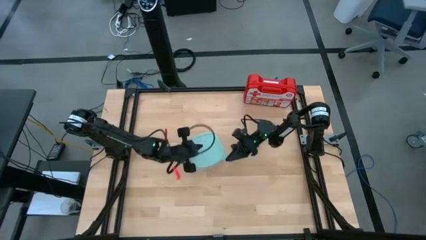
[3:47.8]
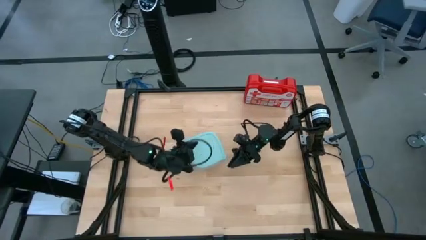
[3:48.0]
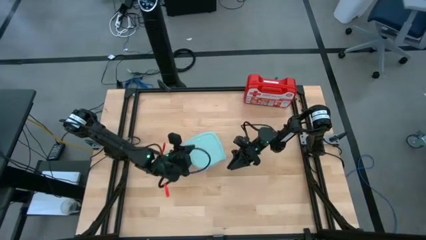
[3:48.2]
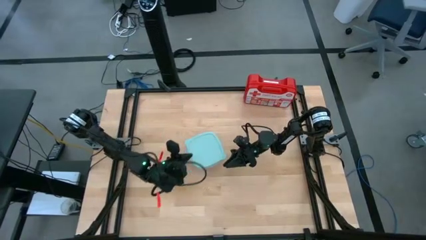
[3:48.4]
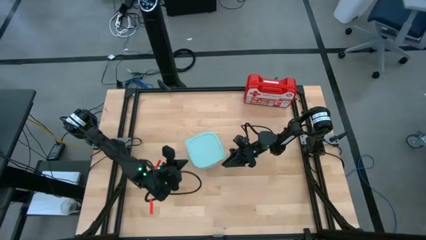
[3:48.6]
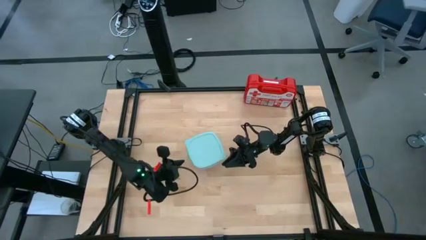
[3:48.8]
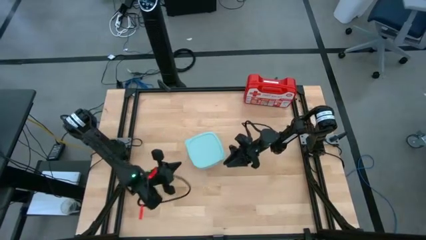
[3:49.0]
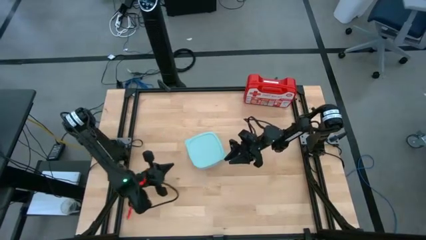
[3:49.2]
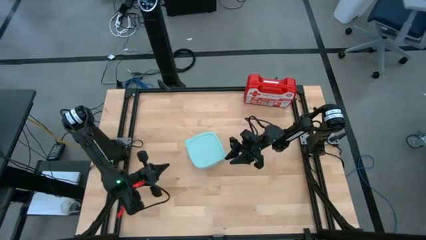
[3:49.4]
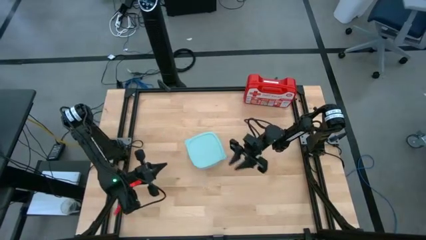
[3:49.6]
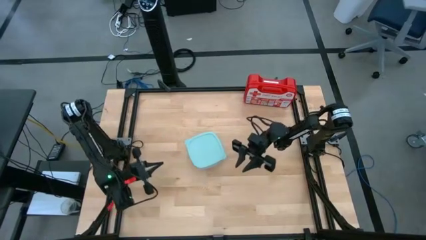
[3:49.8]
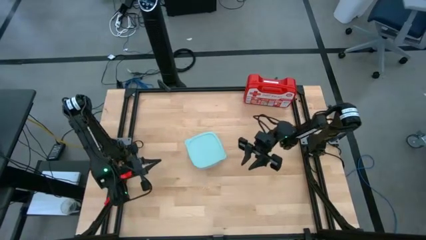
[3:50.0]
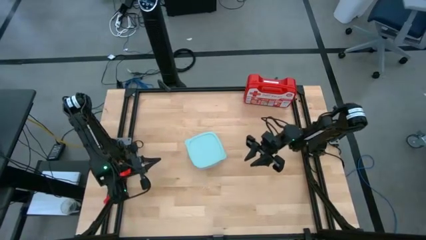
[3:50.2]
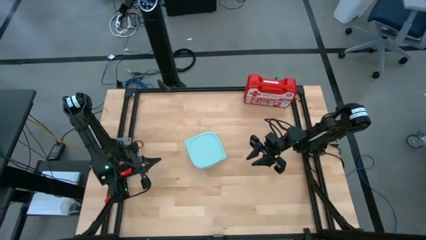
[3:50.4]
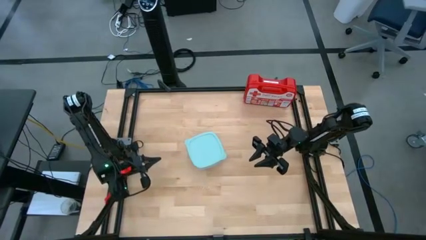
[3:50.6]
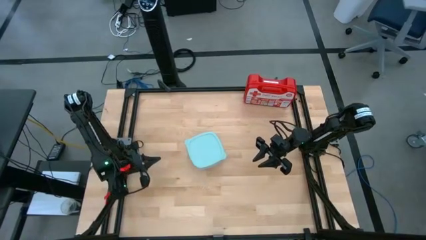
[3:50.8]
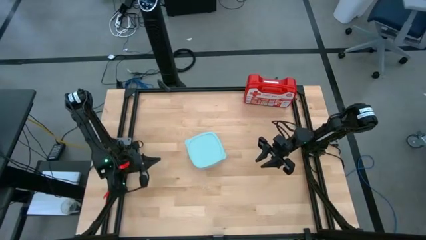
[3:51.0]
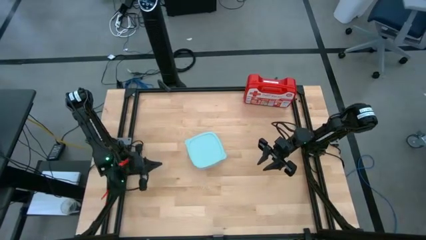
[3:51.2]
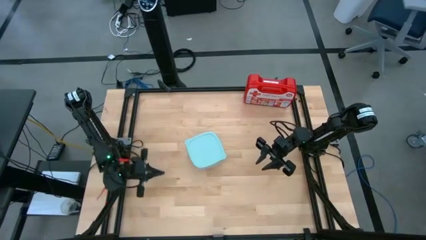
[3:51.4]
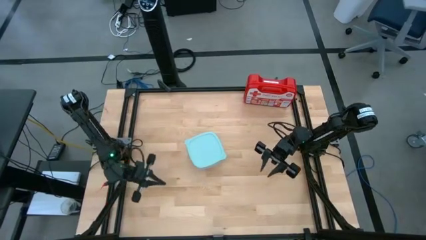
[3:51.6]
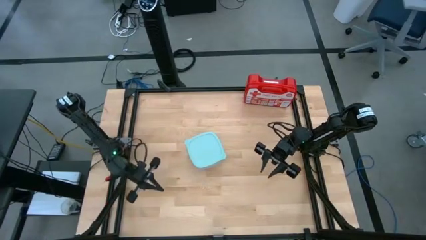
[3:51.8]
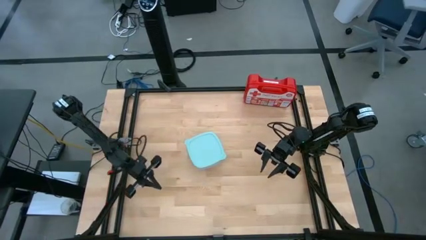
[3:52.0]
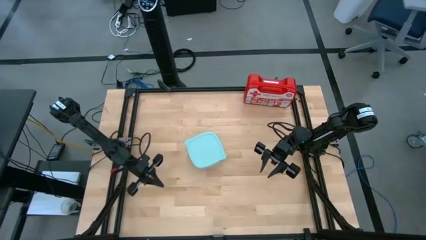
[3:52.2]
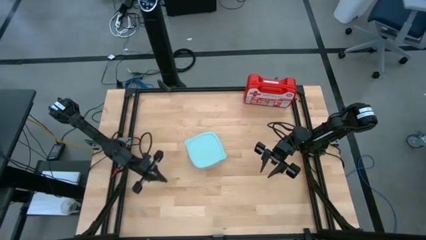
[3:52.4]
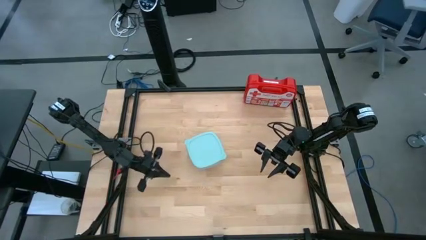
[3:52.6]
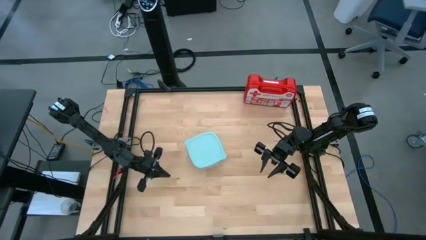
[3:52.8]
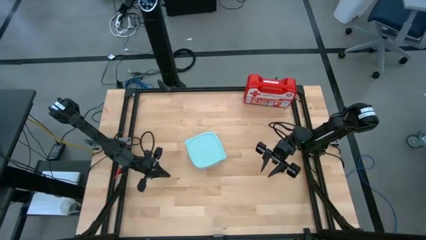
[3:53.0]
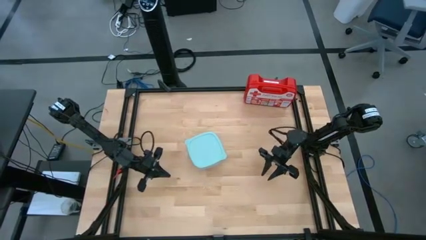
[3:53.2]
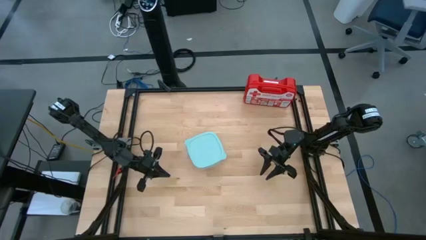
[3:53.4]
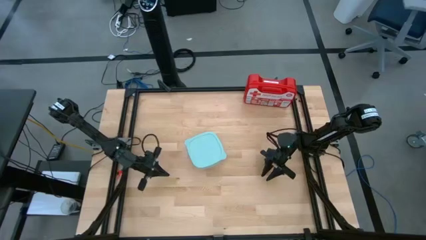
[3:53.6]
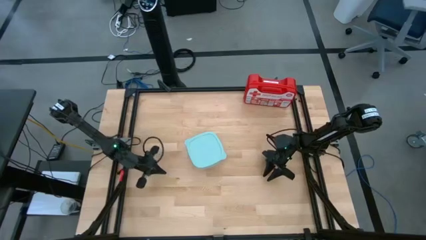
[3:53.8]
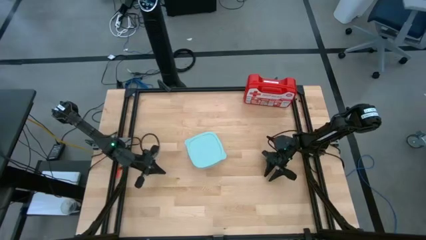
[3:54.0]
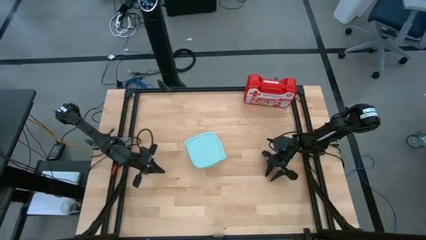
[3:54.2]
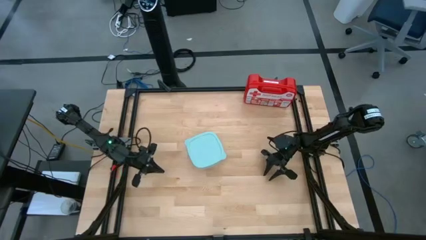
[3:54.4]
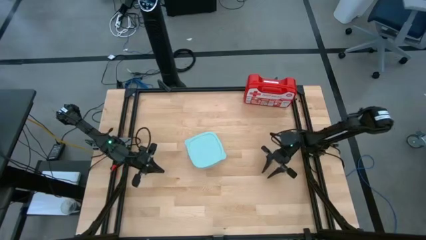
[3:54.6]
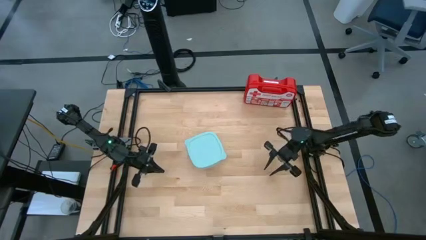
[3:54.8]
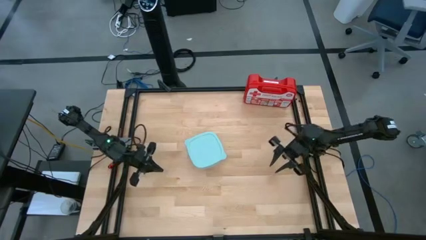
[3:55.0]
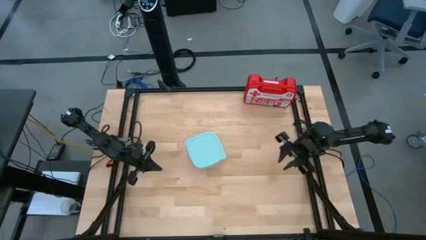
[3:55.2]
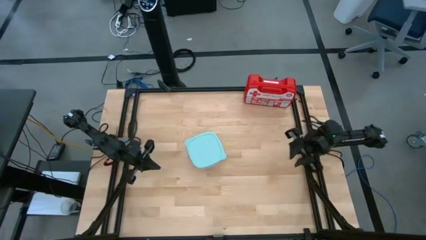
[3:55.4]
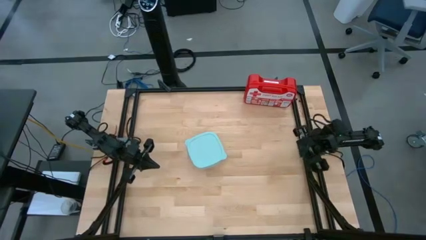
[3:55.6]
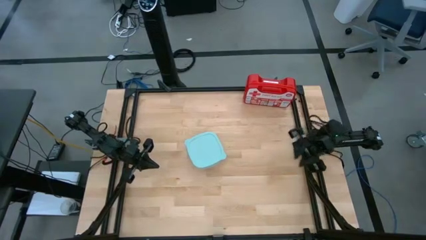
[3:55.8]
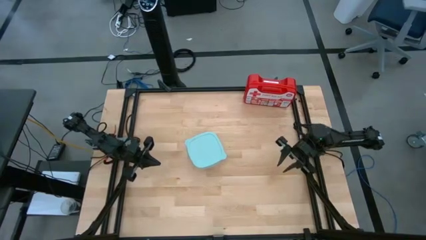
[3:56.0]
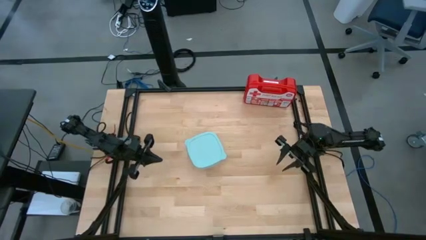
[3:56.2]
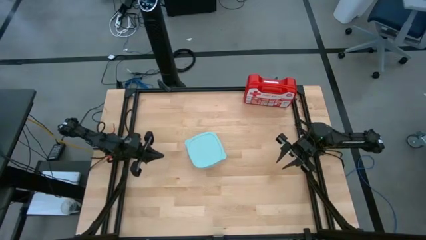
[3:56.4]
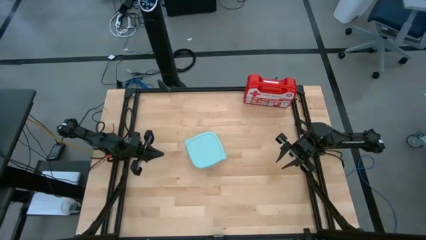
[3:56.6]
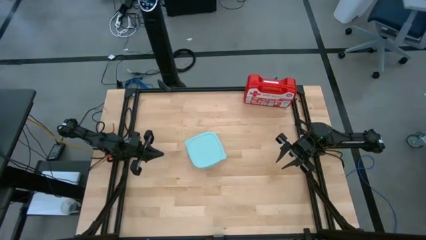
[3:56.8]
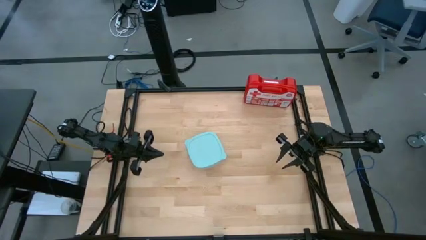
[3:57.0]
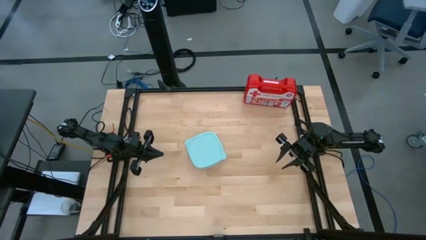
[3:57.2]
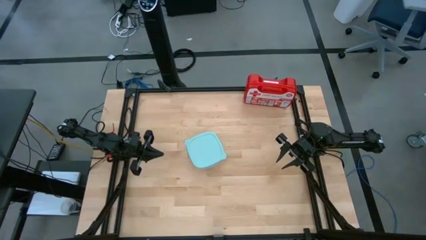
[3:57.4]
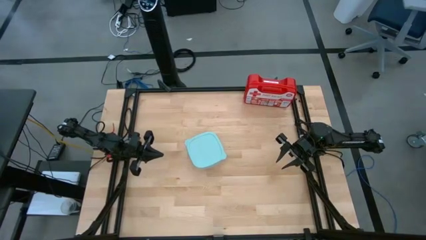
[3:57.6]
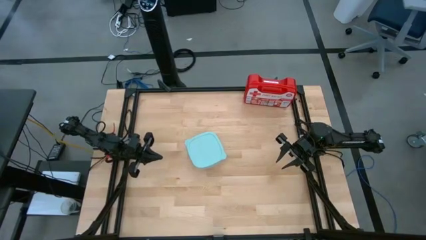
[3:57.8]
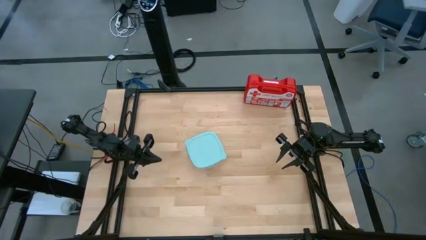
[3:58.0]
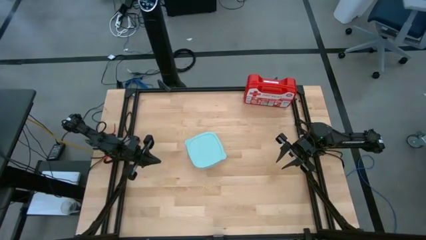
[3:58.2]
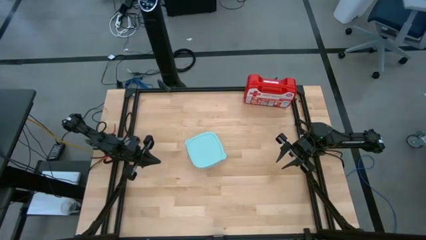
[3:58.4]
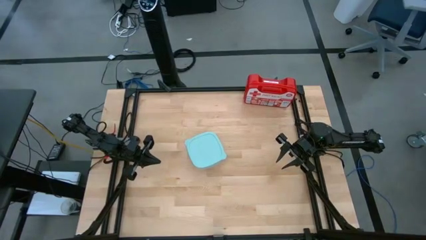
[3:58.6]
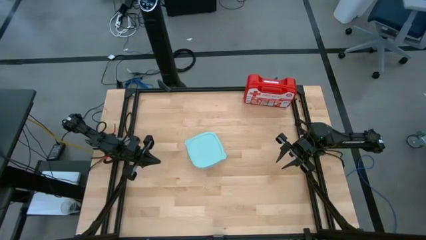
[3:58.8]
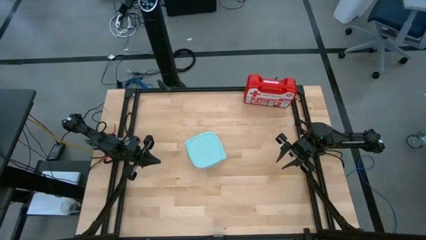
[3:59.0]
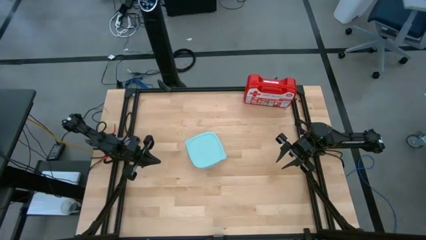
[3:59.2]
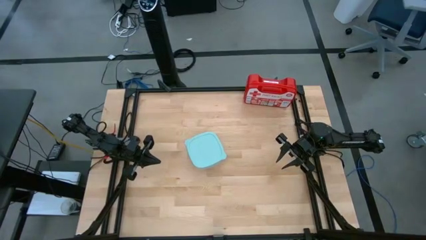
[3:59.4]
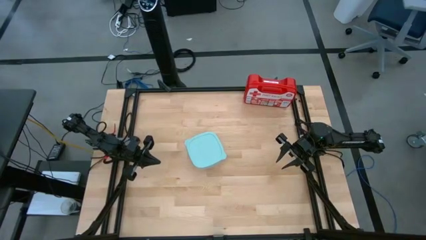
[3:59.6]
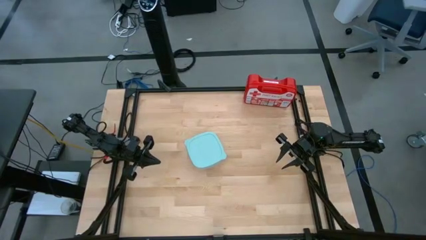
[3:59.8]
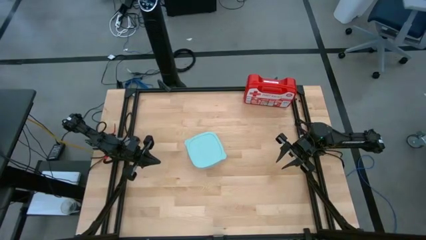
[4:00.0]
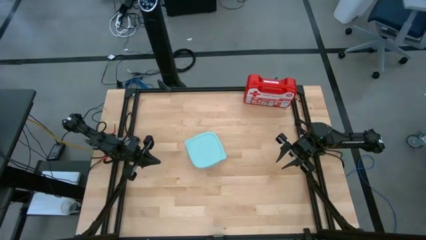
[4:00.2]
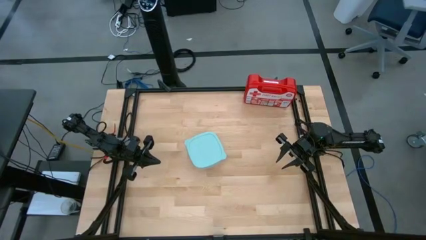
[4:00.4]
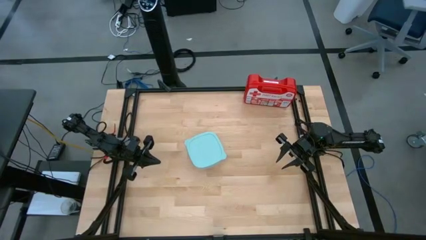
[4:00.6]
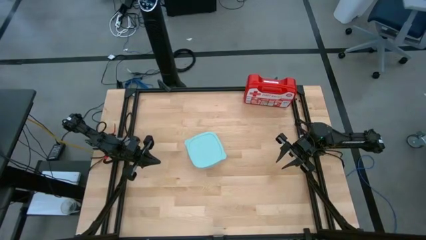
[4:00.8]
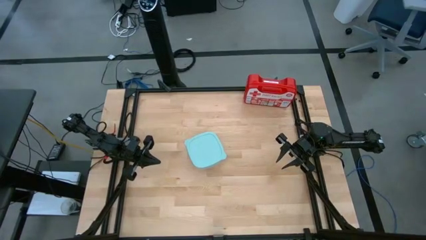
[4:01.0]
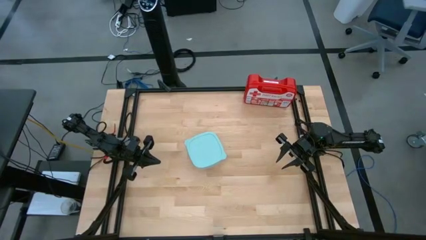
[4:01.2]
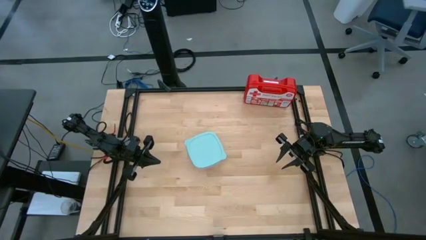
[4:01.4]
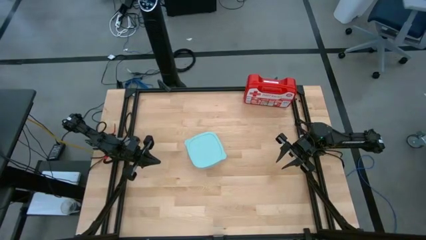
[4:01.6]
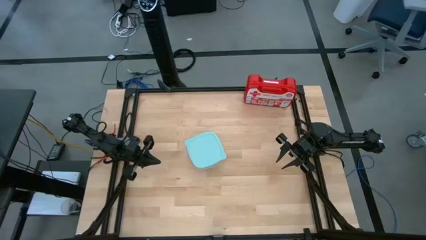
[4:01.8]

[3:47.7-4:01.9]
Task: Roll bandage
Return to Home Position
